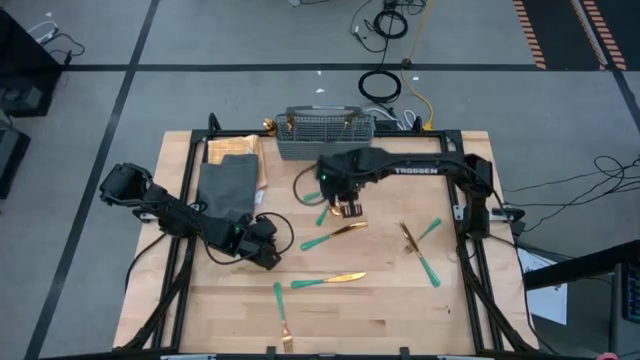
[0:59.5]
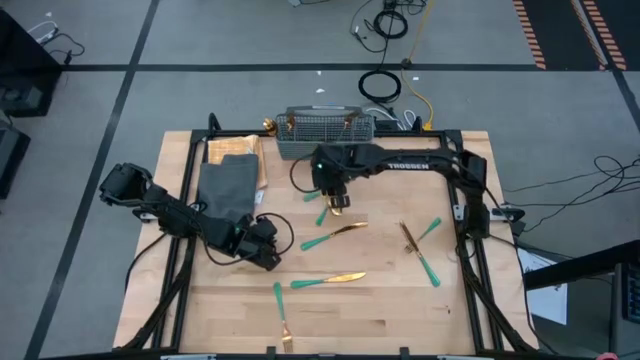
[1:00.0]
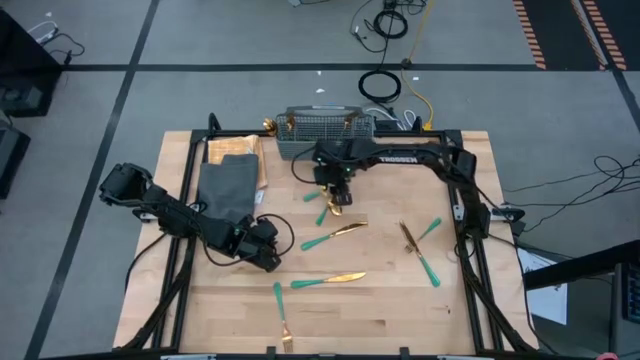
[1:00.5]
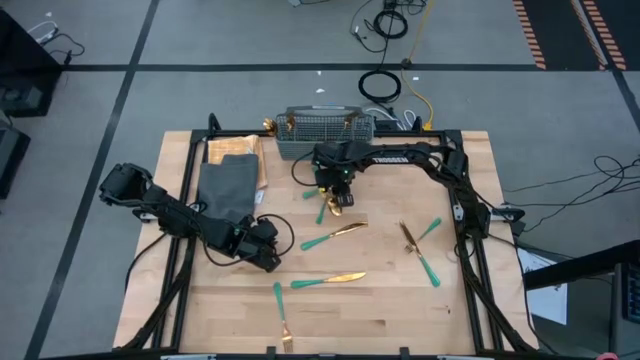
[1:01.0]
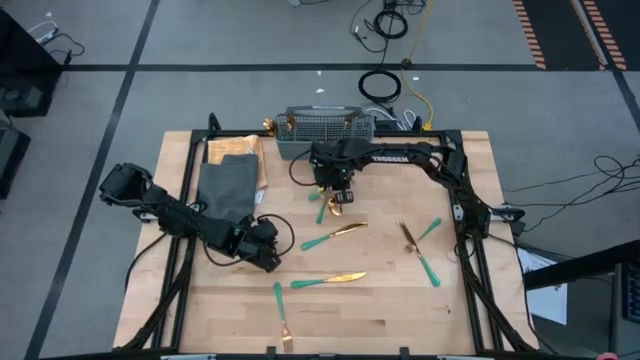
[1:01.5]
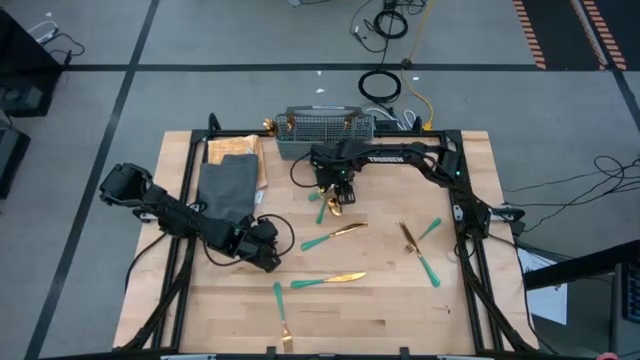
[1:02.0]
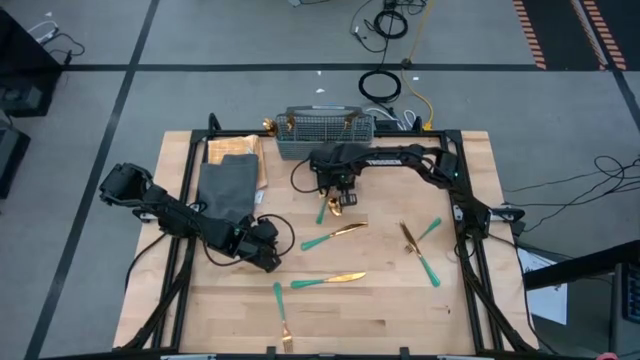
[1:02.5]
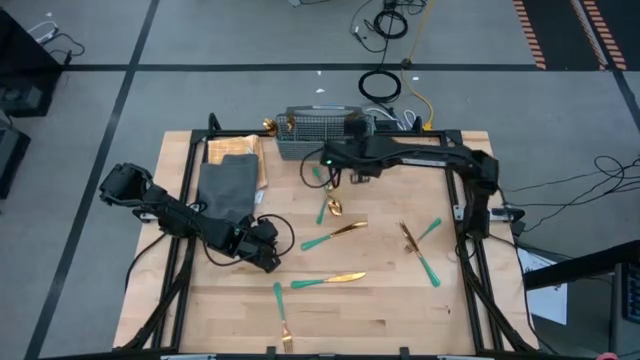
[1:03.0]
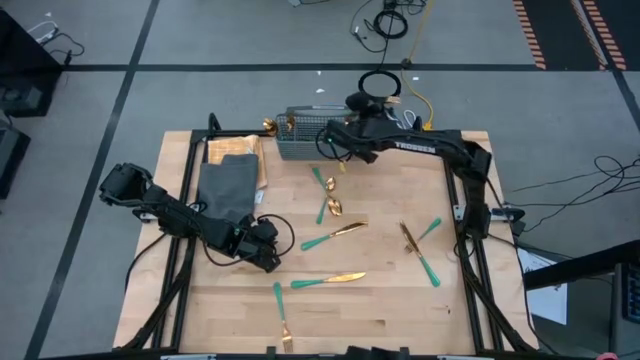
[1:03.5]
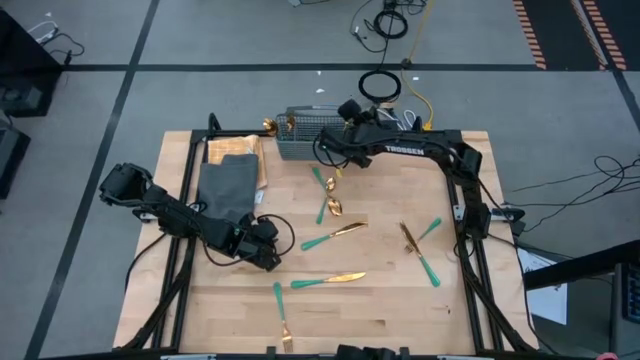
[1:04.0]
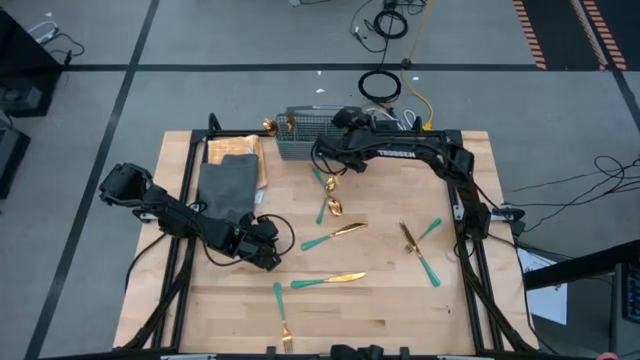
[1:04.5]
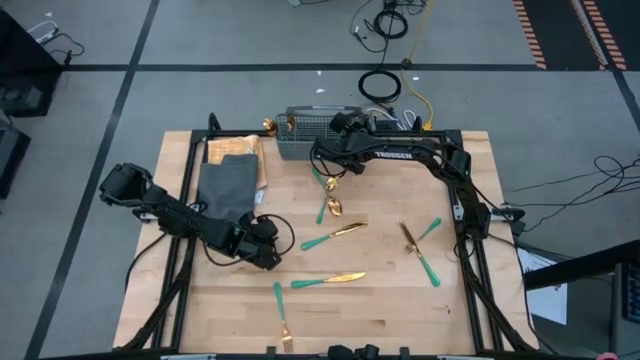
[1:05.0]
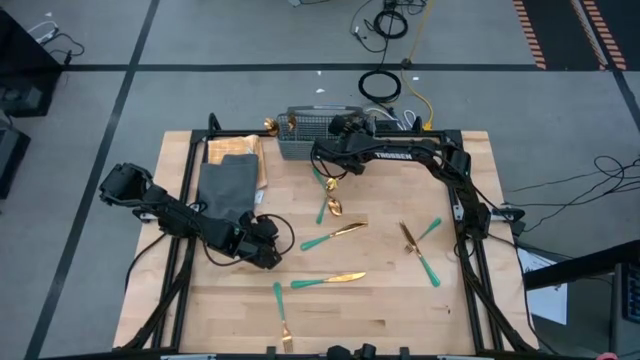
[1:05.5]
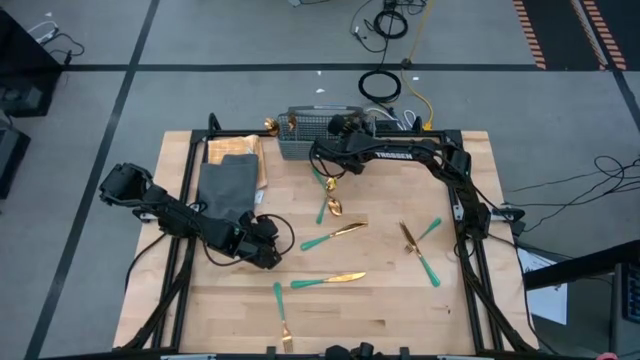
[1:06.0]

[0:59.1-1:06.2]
Task: Sort silverware
Put the green fork into the silverware basket

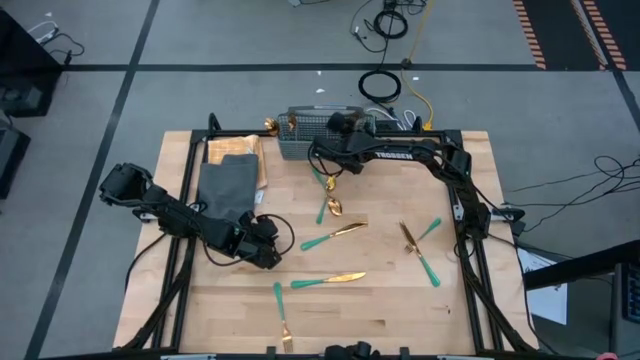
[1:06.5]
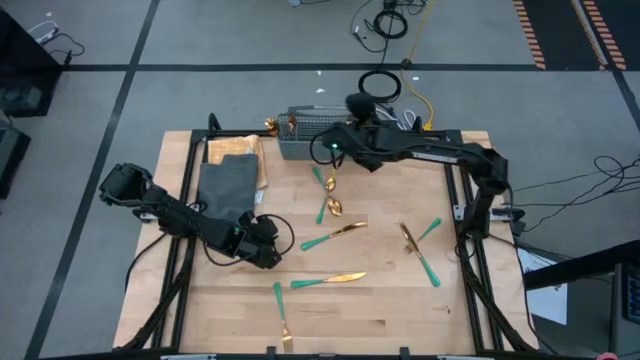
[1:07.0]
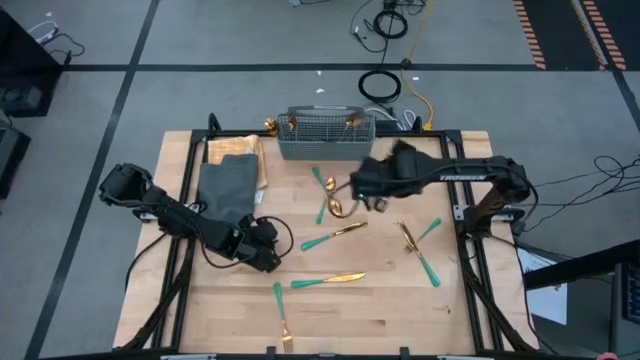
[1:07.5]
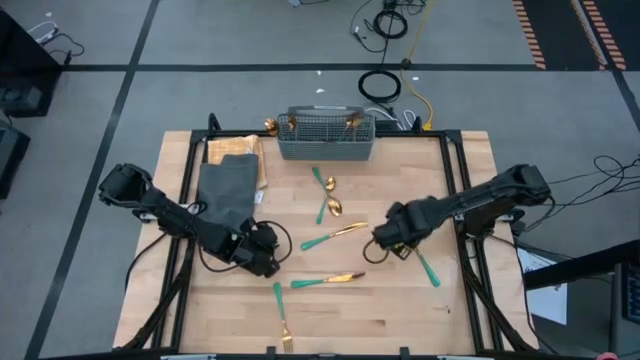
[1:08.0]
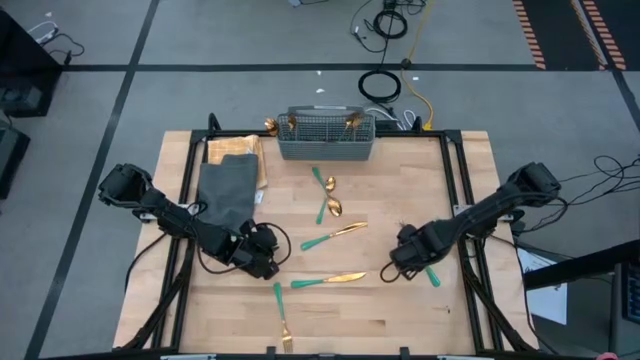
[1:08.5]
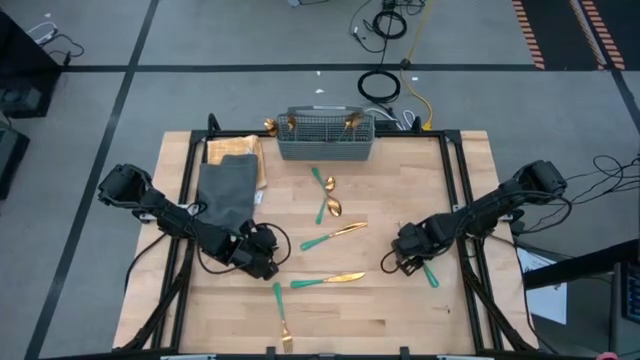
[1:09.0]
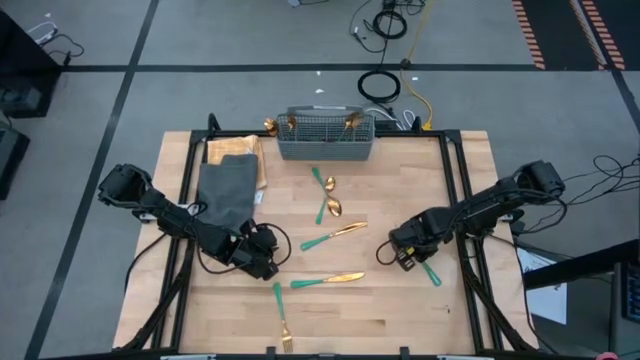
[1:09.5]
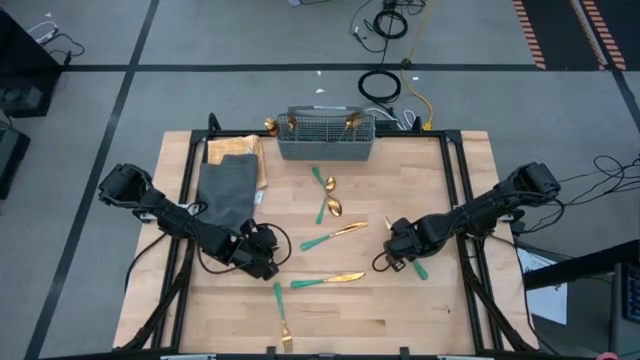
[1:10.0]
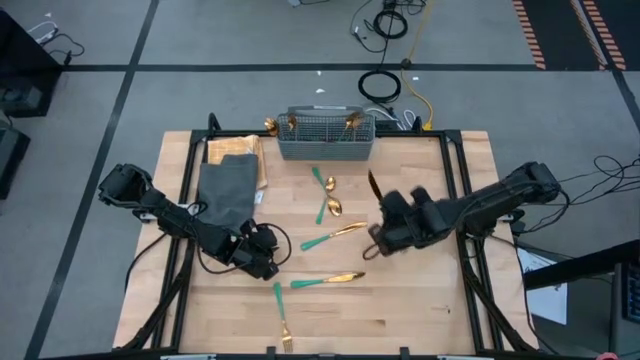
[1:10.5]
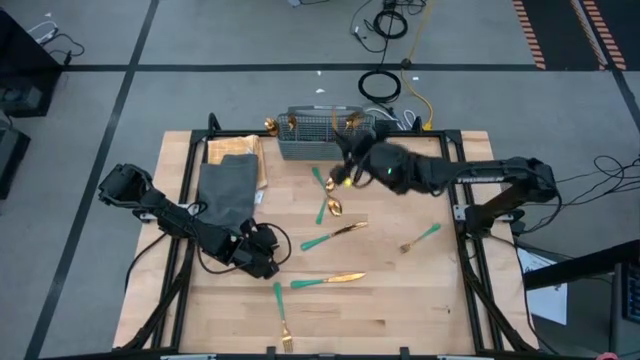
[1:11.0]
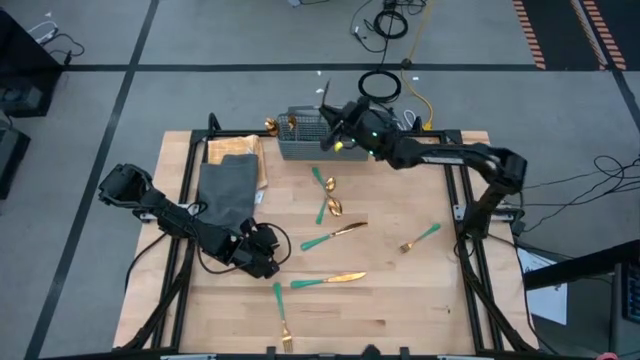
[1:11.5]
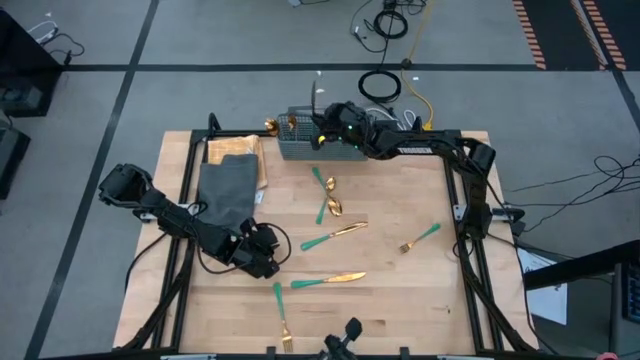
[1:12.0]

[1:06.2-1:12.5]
Put the green table knife into the silverware basket

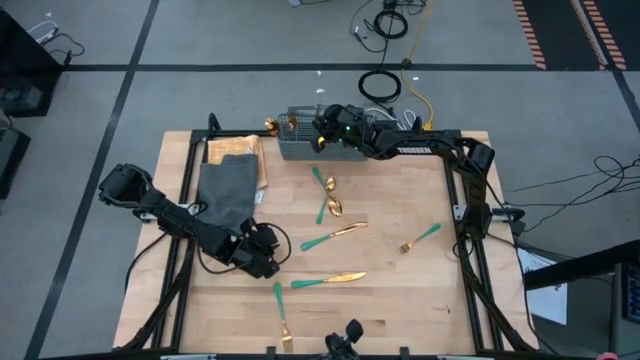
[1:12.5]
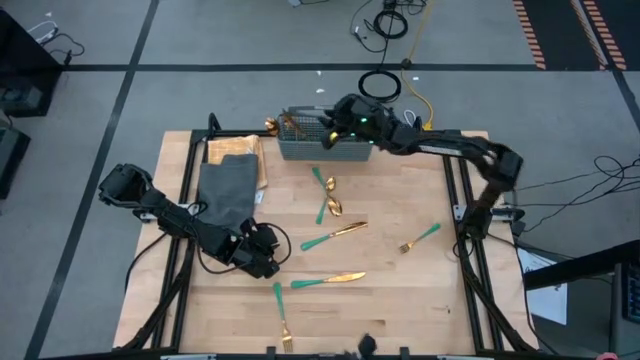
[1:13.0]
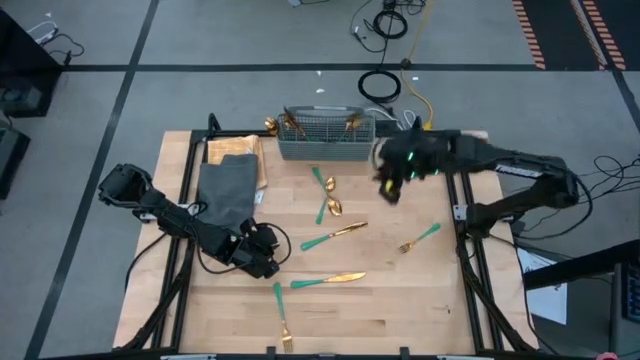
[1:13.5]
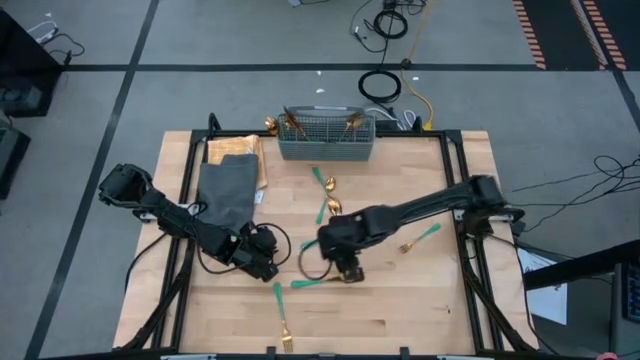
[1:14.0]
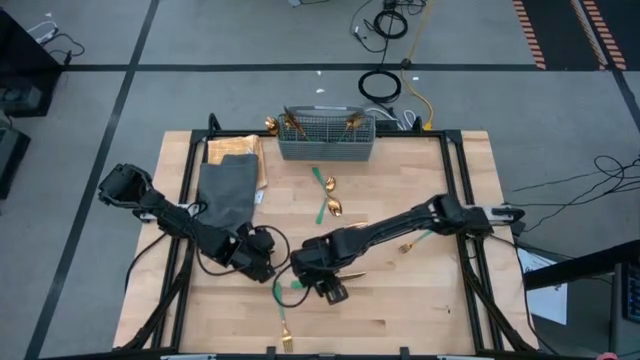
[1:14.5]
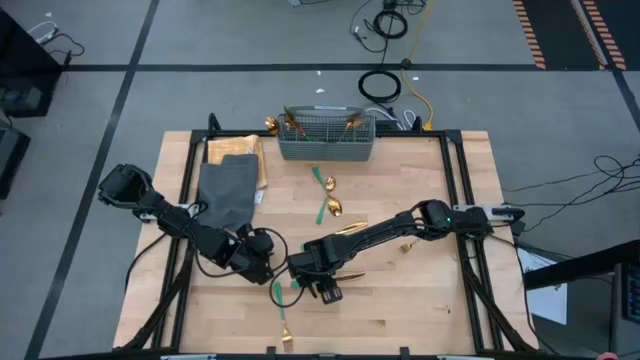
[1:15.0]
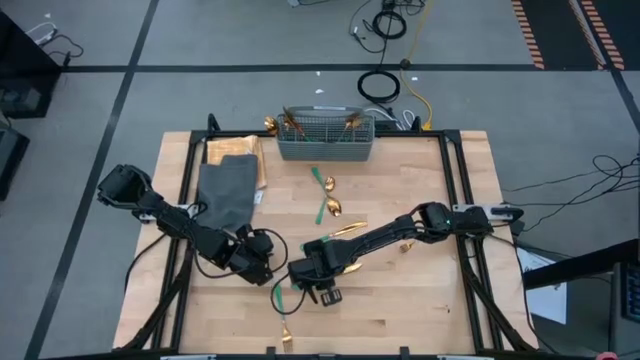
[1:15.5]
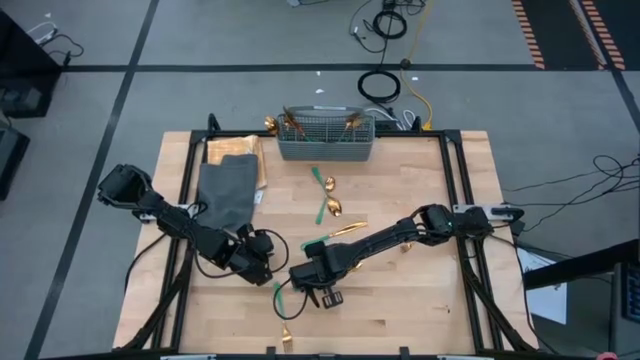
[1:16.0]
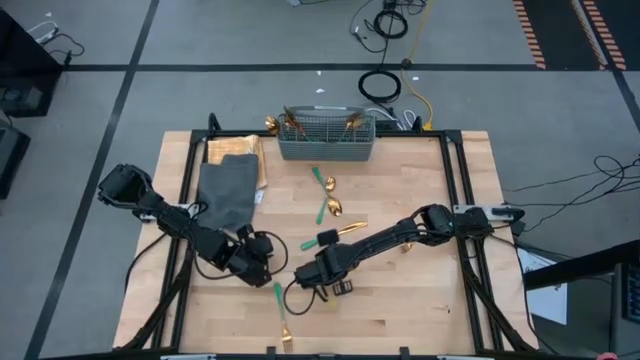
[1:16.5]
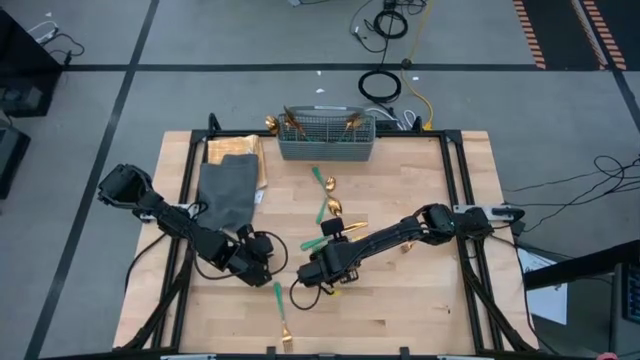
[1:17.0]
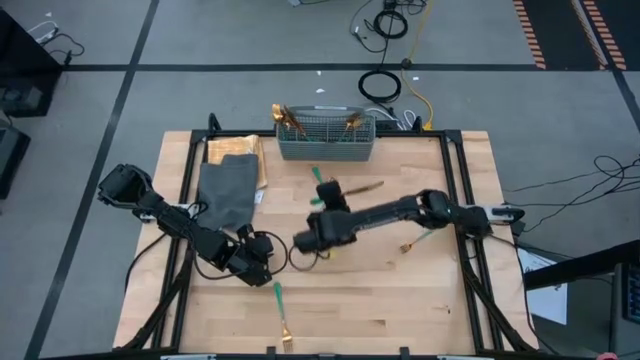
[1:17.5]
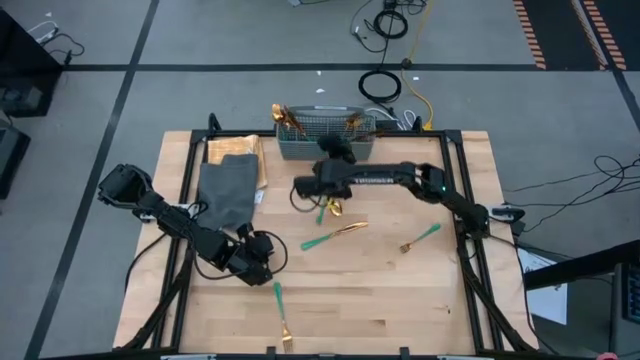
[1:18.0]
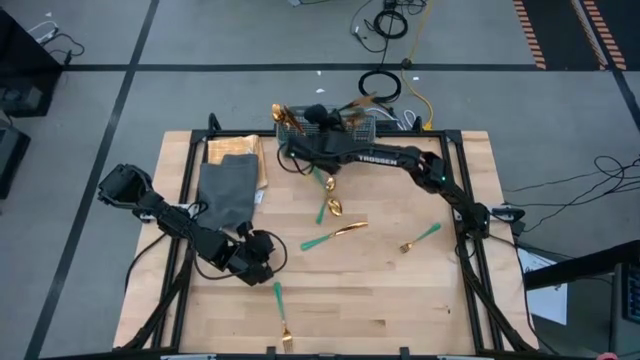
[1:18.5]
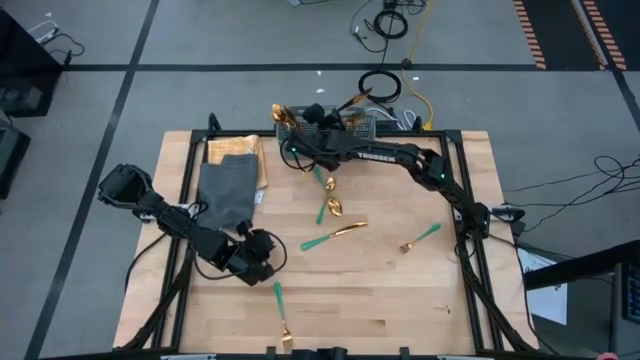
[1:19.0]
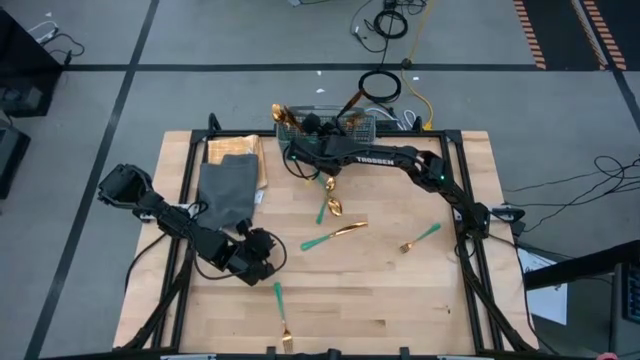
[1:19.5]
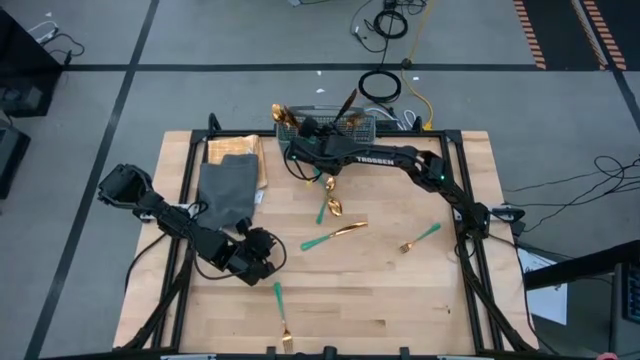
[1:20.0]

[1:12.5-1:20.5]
Put the green table knife into the silverware basket
